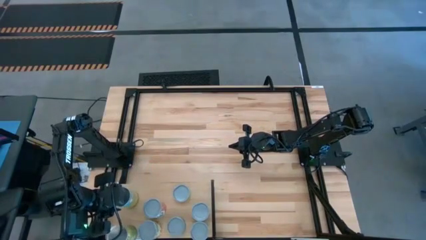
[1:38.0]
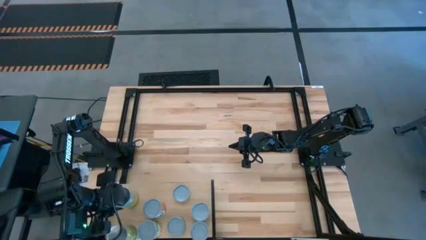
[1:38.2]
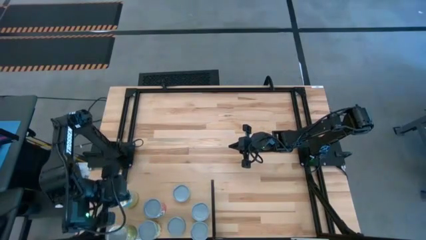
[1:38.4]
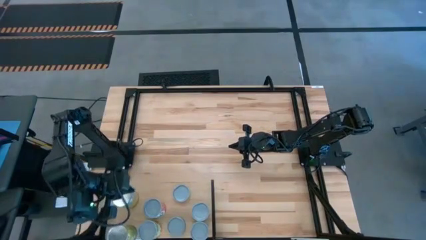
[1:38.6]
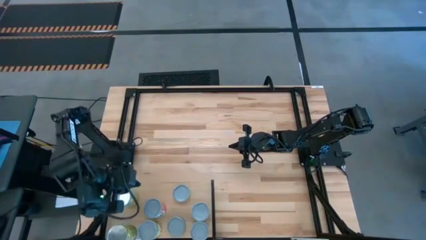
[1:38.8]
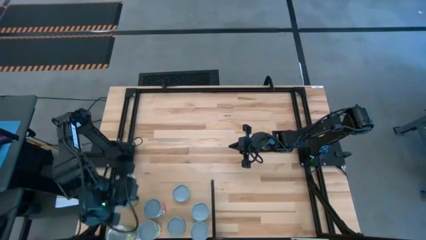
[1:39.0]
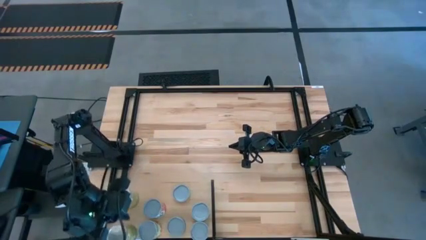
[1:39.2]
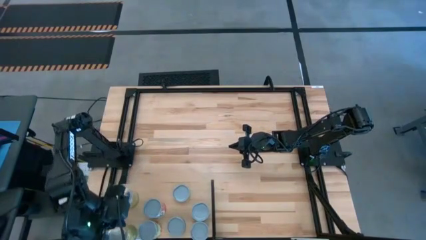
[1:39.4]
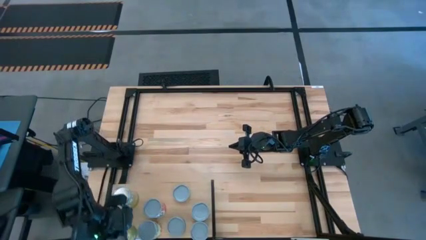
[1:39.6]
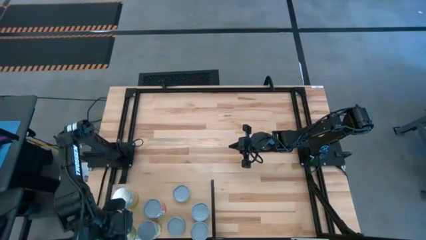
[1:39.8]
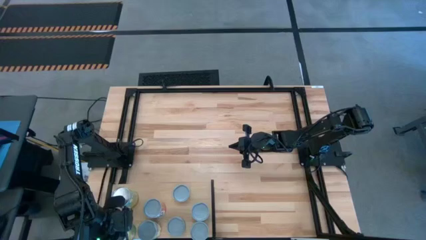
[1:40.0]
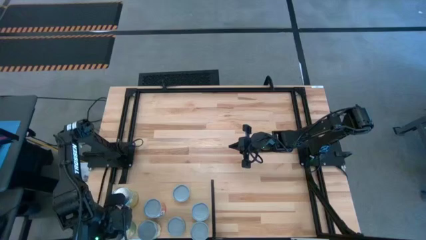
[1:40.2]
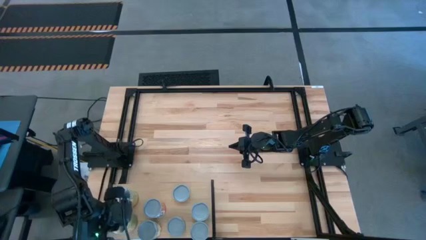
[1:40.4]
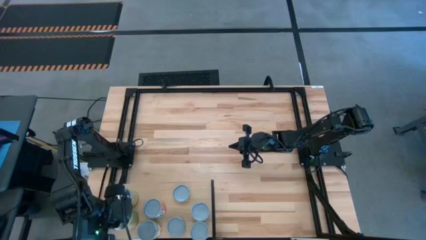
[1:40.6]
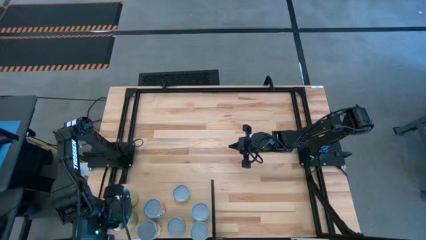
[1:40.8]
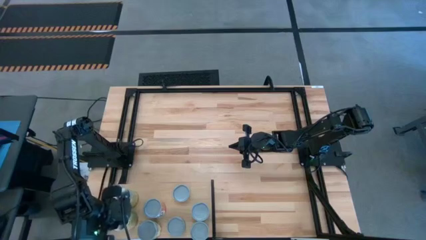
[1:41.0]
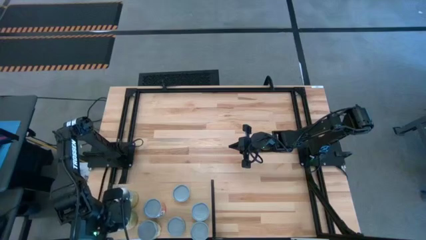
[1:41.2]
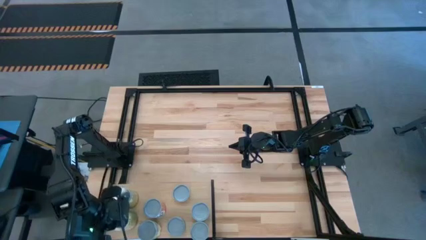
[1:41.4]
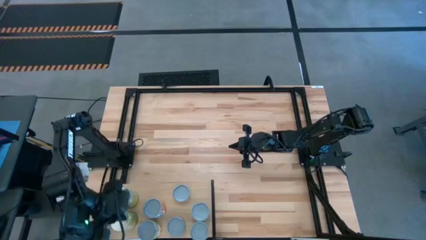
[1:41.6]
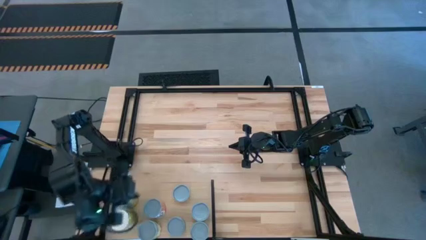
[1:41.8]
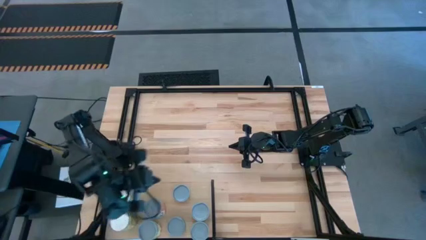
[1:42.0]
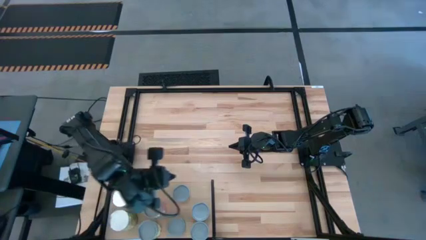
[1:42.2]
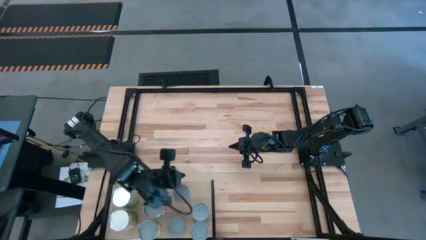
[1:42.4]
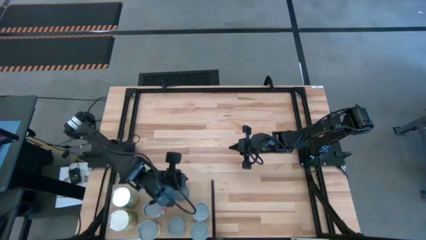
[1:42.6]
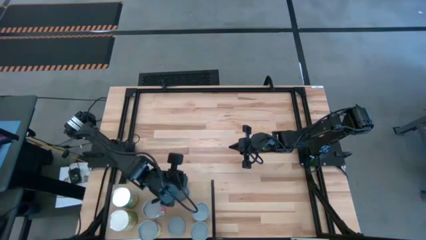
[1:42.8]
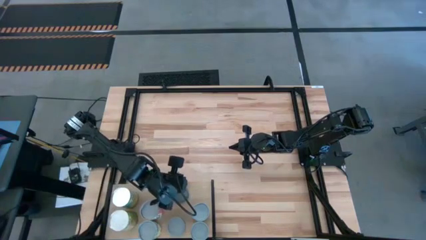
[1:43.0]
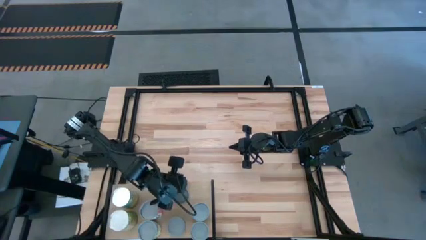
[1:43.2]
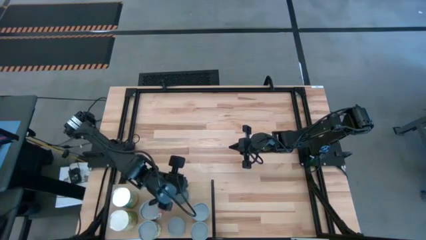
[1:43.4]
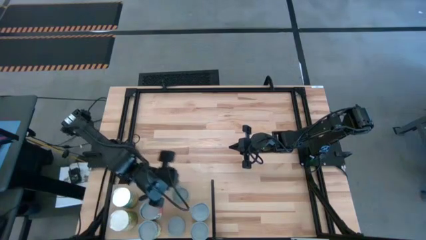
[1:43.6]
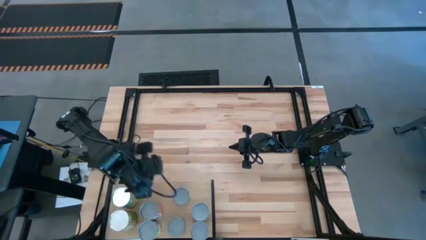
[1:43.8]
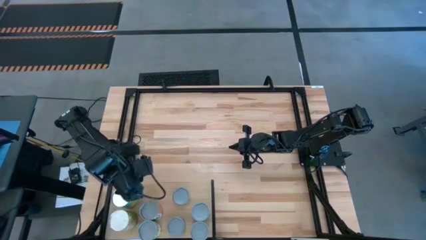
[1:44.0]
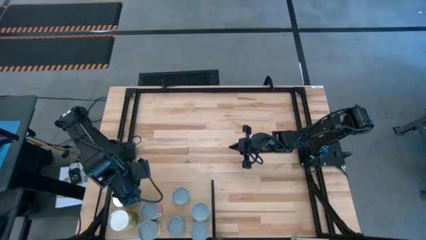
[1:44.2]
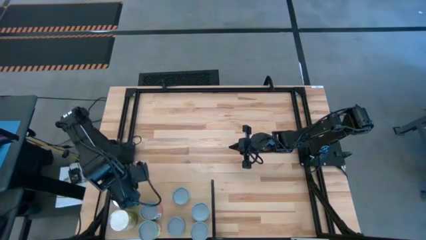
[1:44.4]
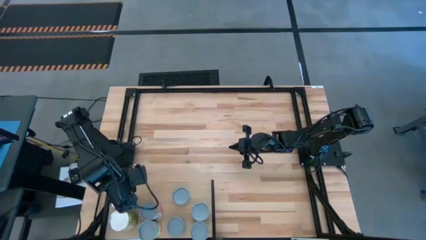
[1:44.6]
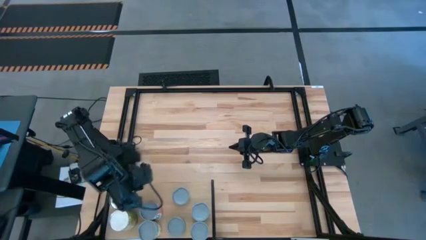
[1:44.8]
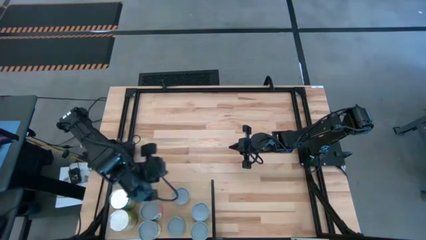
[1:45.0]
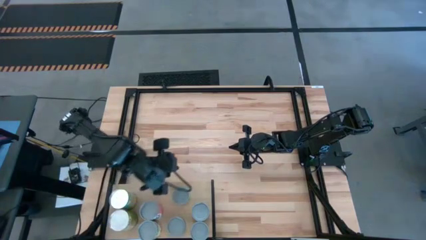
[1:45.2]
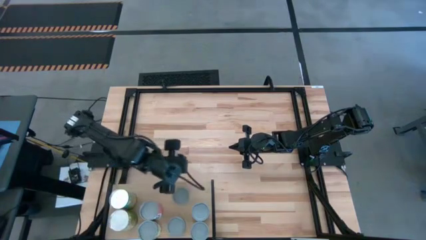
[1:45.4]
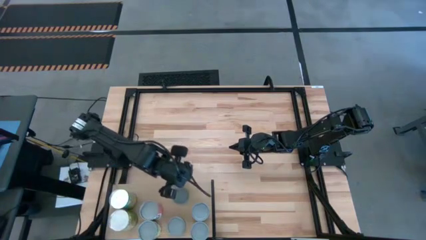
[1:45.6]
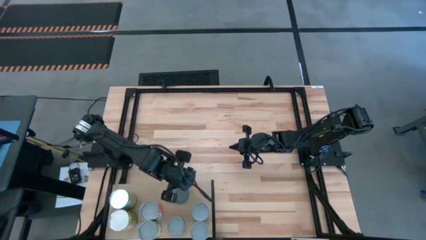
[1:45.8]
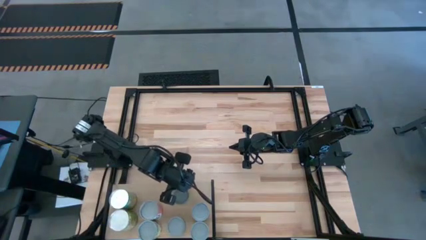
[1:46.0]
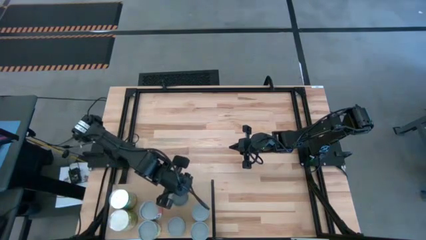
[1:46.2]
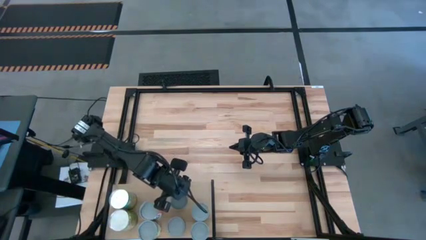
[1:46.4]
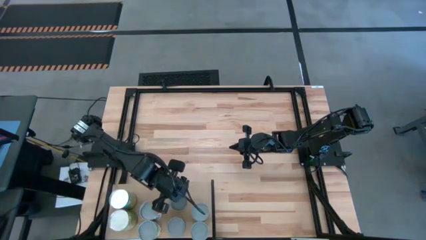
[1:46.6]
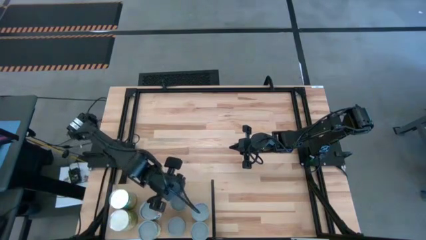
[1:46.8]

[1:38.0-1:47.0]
Task: Pick and place cans onto a shelf
Adjust the canned goods on the shelf

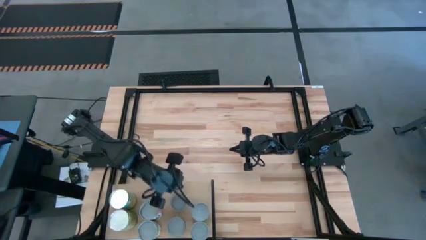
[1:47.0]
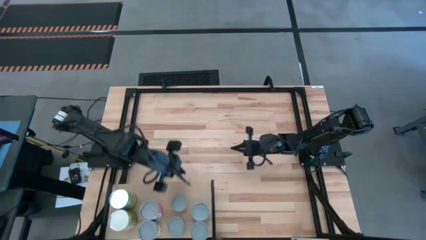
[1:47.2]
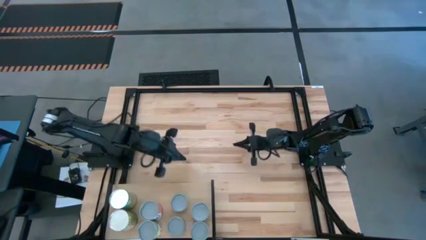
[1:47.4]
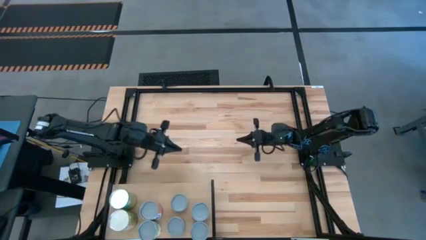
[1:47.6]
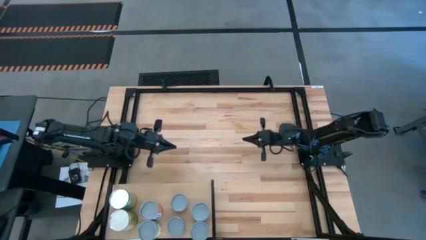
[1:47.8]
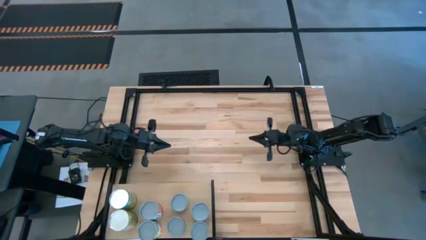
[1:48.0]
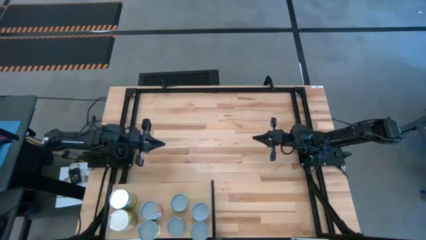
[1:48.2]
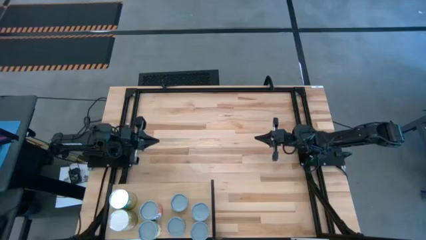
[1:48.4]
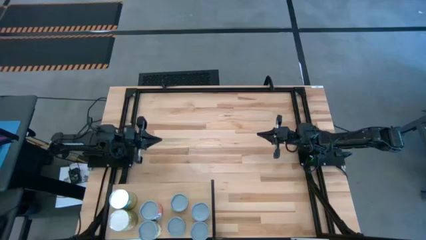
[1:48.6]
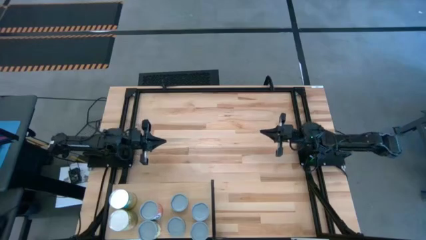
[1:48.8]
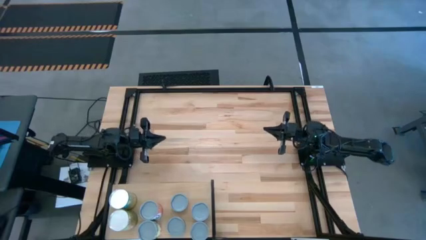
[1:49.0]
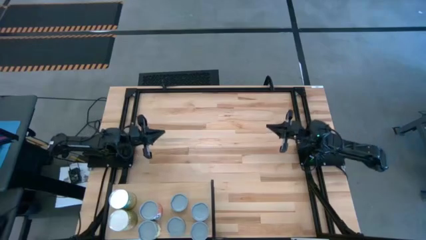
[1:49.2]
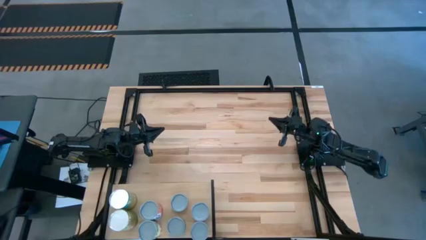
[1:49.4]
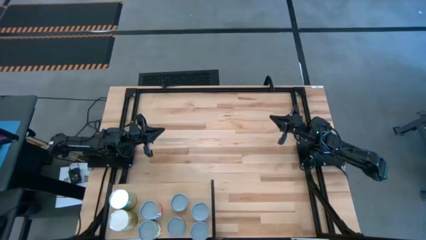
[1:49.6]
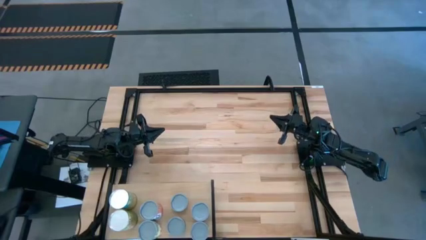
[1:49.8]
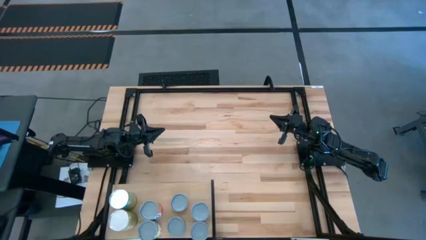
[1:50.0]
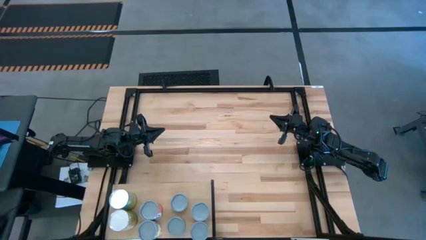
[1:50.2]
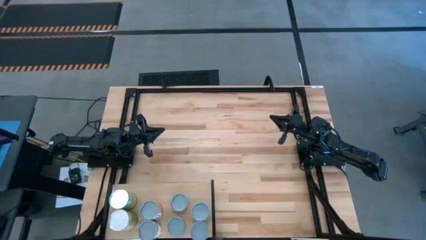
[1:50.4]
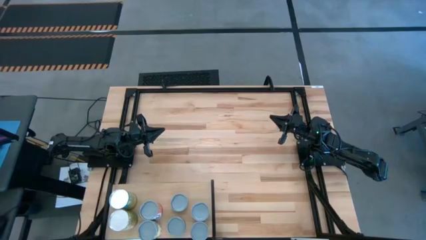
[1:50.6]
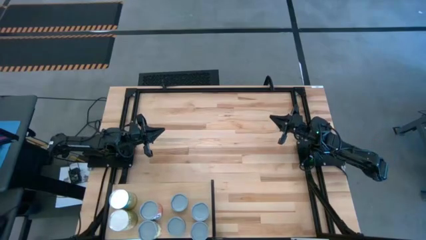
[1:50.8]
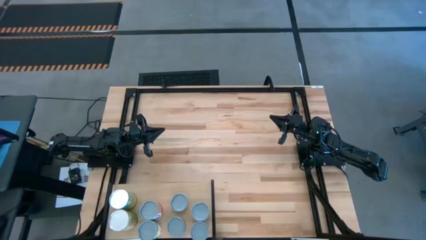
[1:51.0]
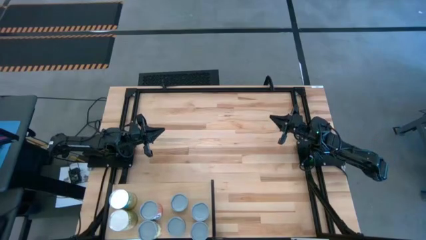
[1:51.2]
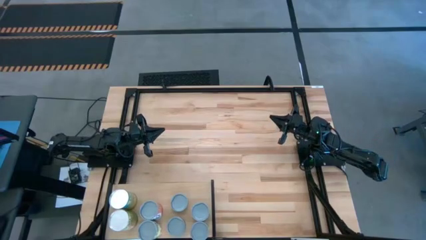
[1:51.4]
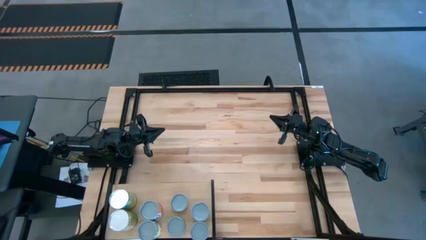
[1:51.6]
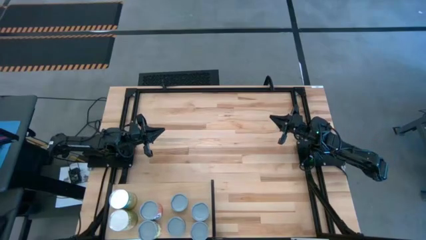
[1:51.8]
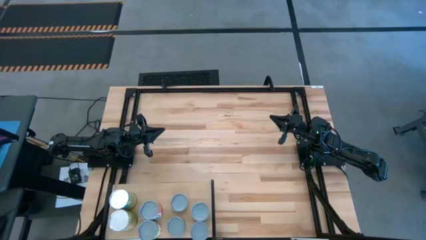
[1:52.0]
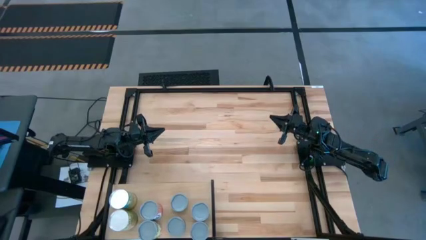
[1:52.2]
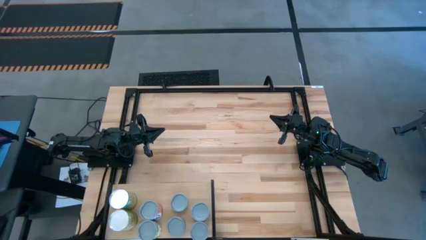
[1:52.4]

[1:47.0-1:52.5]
Return to Home Position
